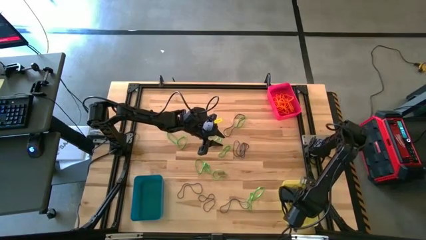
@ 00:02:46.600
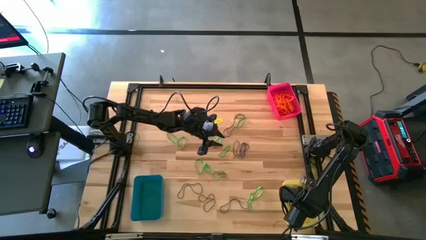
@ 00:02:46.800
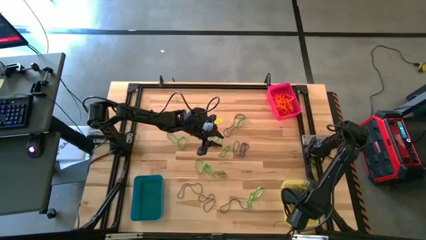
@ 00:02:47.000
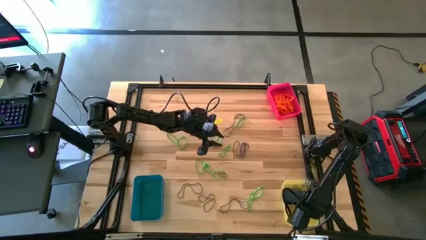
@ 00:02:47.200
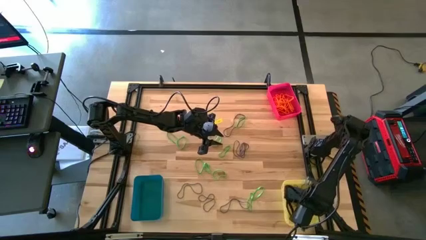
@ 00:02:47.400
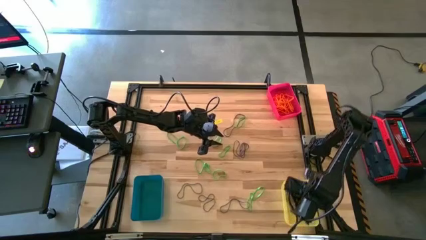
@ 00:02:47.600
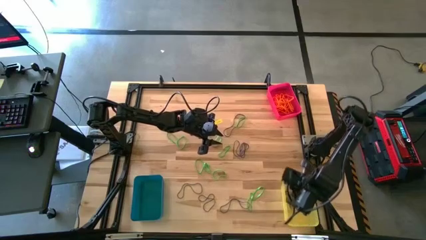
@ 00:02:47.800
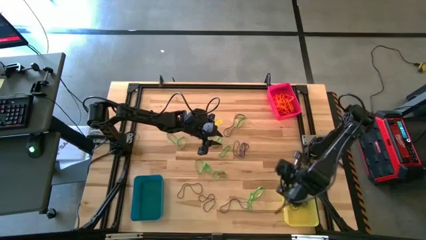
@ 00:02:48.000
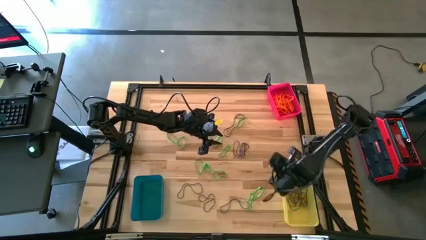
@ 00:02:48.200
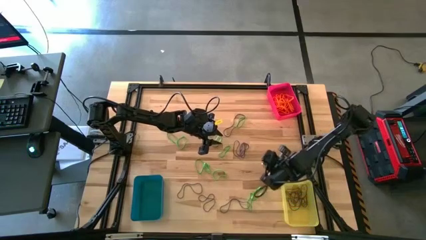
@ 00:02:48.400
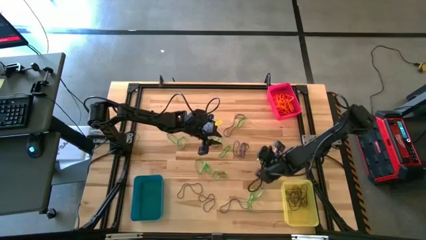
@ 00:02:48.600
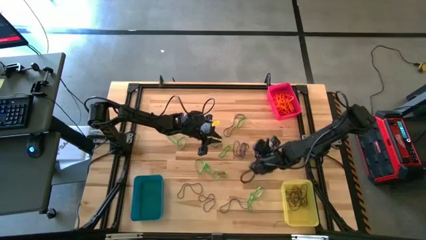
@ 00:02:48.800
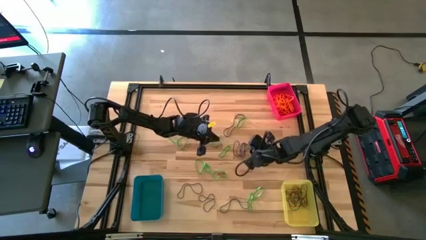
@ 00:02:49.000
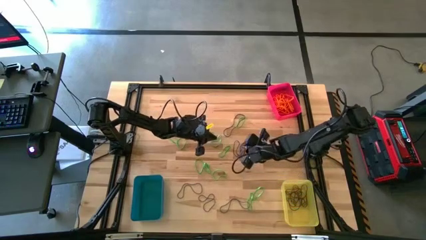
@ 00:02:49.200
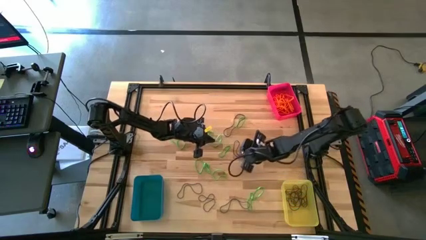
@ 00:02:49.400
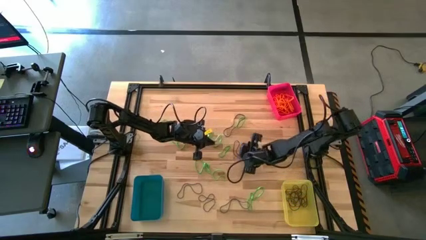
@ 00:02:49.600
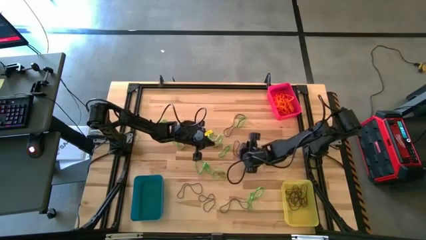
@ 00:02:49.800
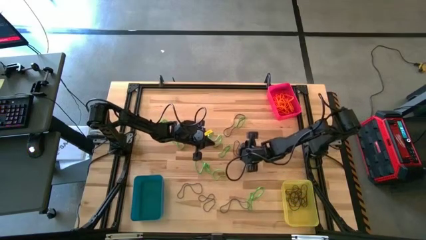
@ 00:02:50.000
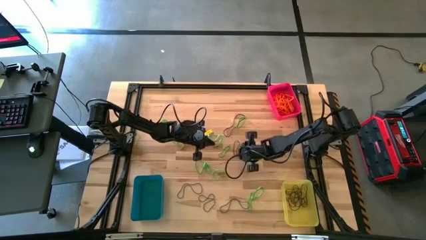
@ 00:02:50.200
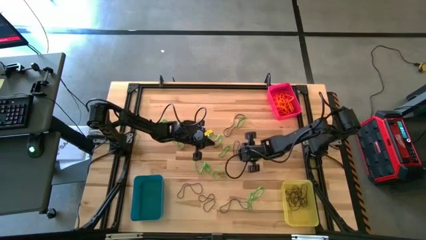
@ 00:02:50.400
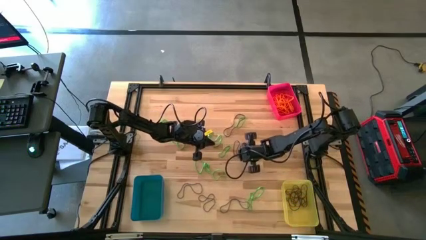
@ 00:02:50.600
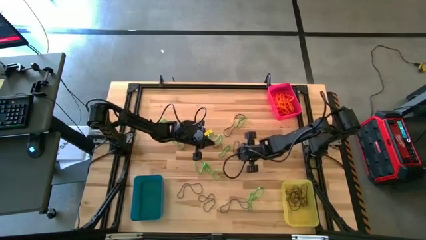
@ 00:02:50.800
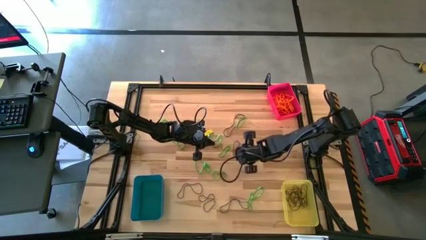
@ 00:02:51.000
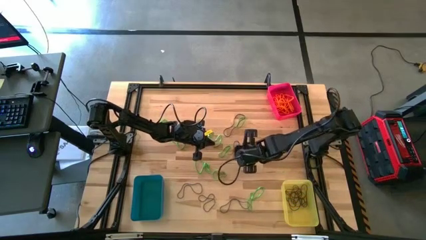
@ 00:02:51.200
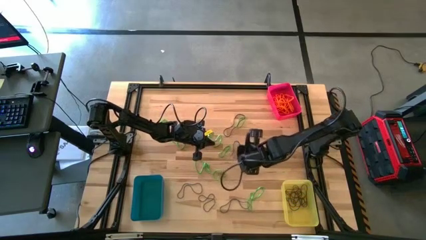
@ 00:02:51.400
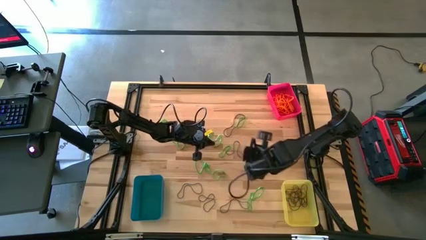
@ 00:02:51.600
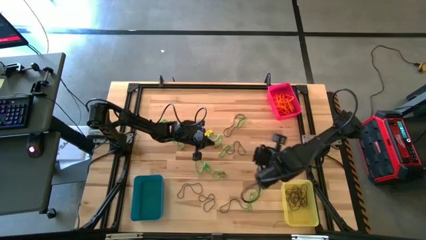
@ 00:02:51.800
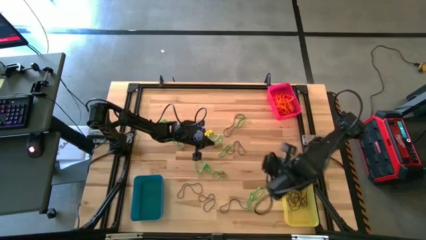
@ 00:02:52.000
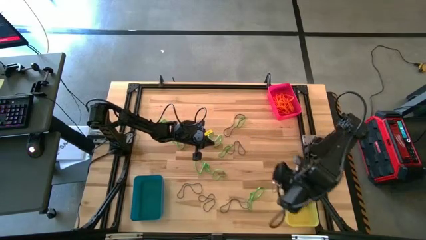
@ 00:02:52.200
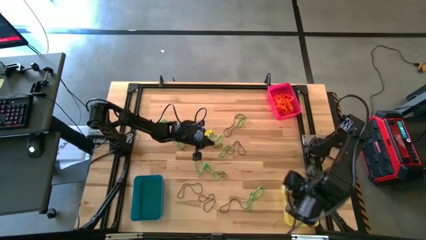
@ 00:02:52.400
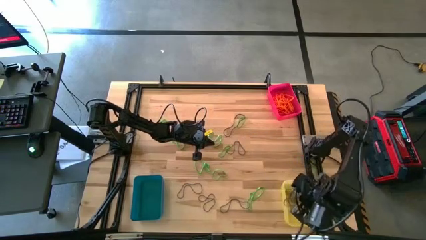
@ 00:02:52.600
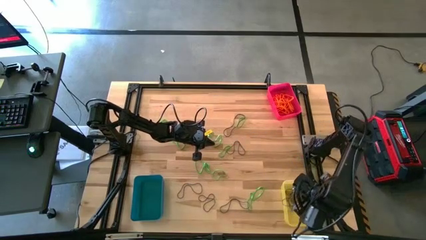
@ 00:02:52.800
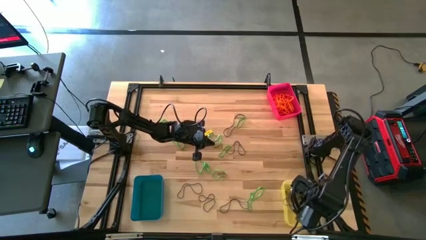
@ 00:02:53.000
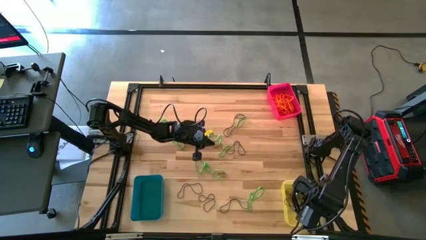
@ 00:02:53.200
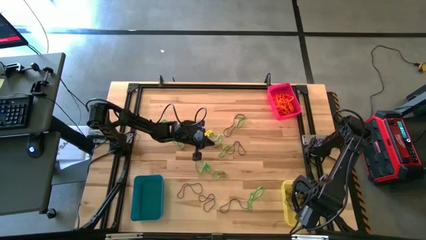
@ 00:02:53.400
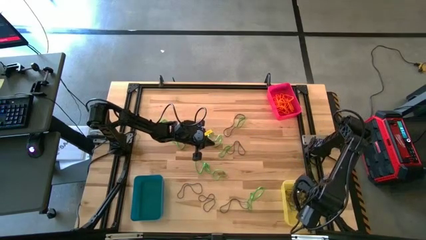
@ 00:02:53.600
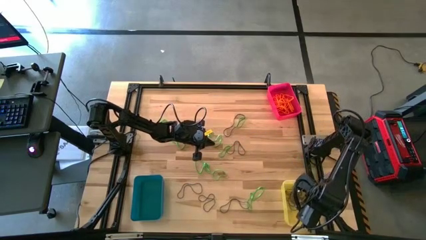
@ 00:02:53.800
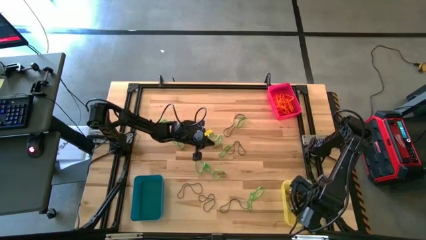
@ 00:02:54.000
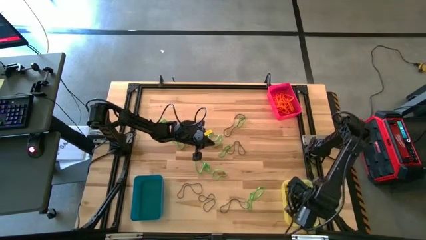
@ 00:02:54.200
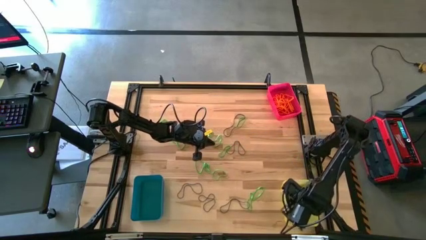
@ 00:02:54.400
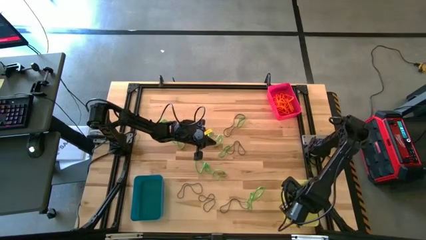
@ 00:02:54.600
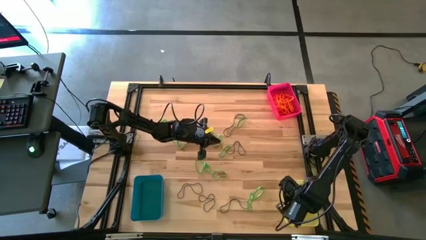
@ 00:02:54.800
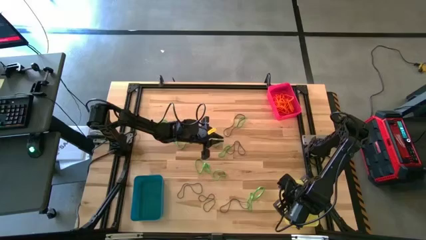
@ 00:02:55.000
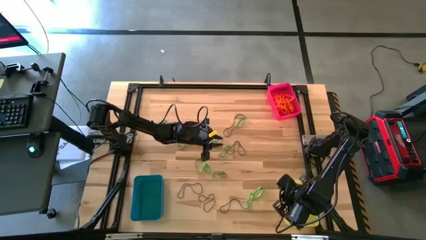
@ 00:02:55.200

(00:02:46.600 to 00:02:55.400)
Task: Sort rubber bands into baskets
Put the purple rubber band into the yellow bin

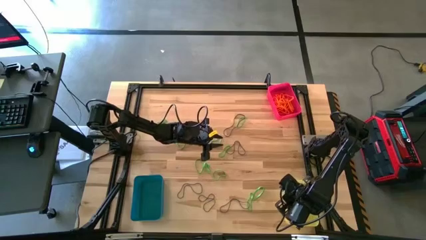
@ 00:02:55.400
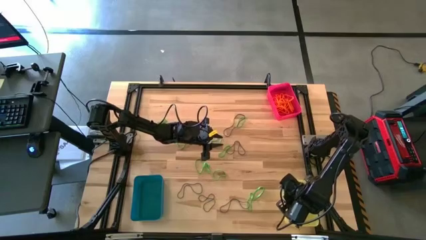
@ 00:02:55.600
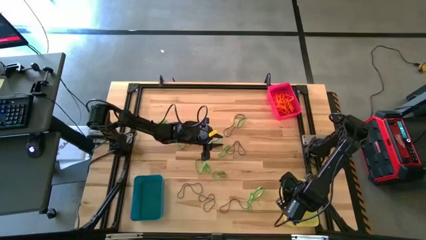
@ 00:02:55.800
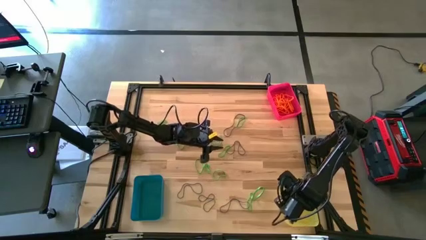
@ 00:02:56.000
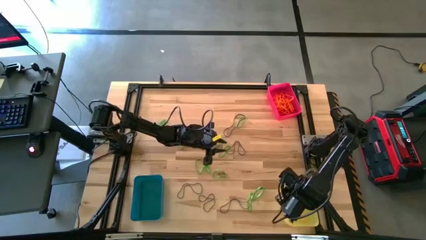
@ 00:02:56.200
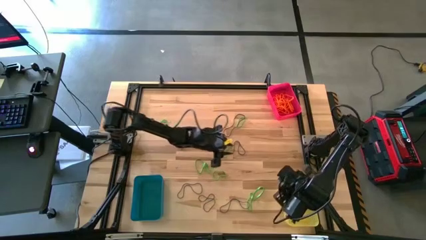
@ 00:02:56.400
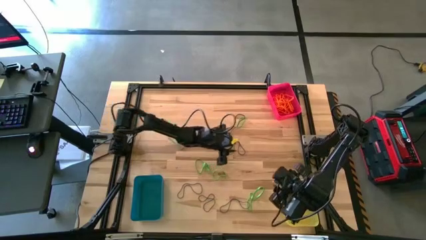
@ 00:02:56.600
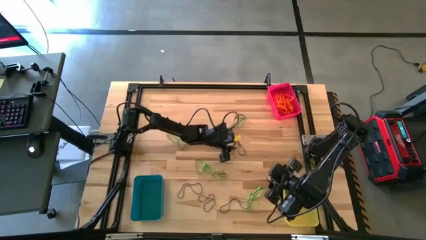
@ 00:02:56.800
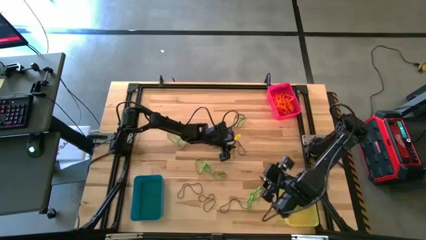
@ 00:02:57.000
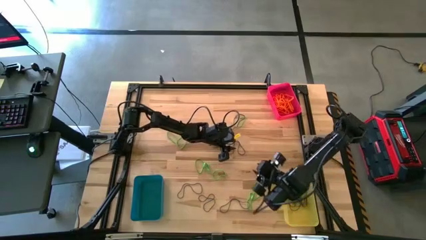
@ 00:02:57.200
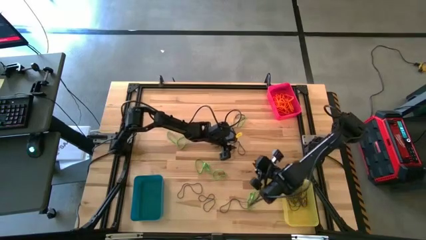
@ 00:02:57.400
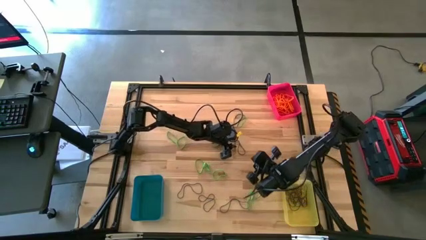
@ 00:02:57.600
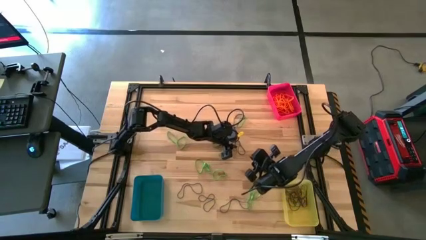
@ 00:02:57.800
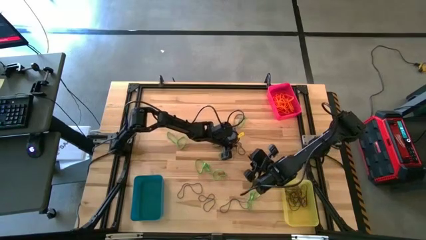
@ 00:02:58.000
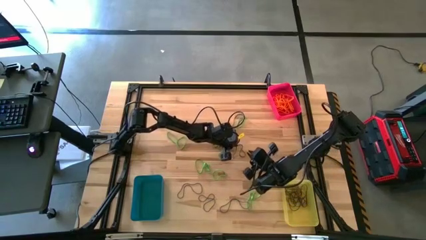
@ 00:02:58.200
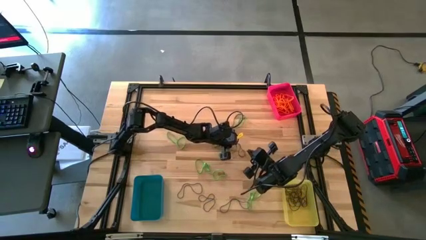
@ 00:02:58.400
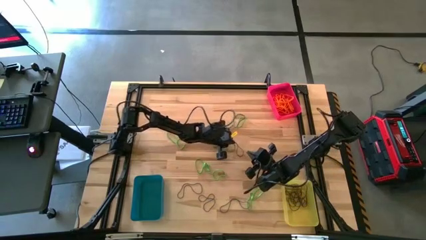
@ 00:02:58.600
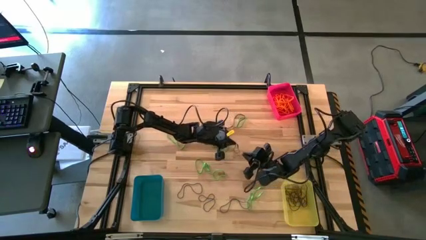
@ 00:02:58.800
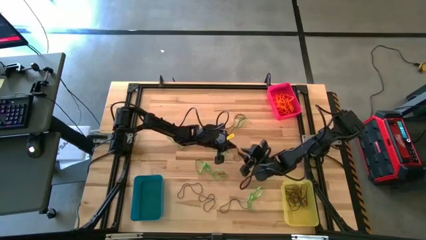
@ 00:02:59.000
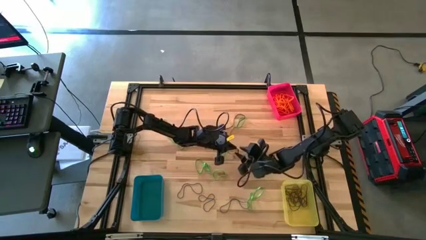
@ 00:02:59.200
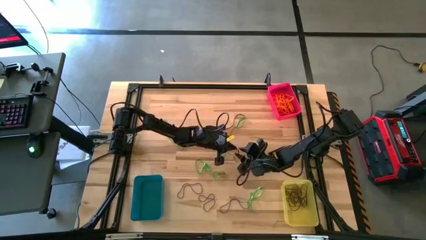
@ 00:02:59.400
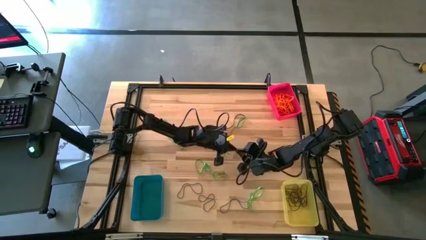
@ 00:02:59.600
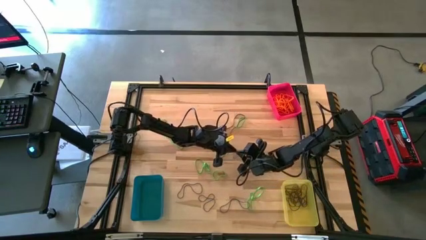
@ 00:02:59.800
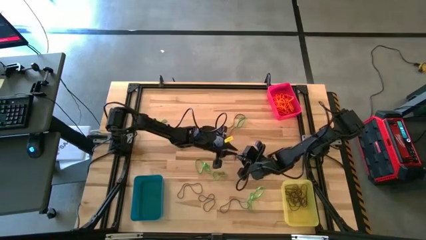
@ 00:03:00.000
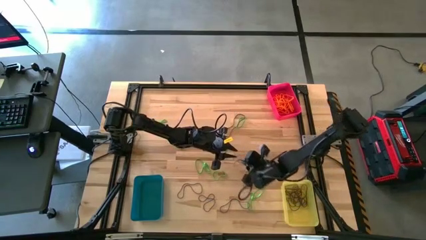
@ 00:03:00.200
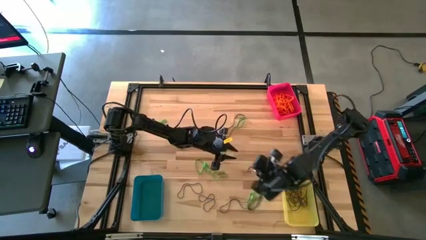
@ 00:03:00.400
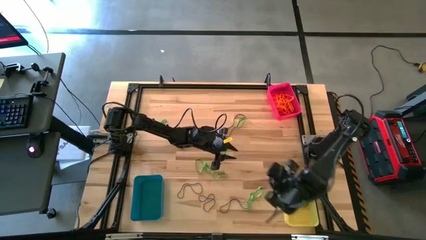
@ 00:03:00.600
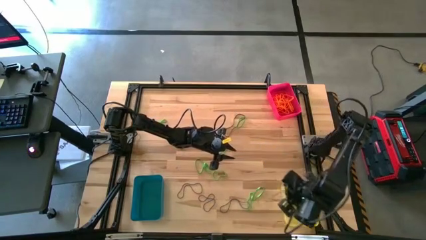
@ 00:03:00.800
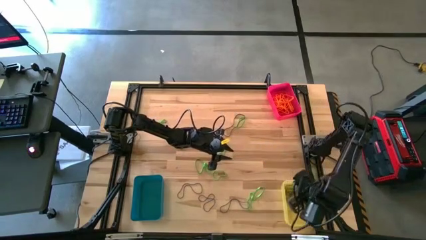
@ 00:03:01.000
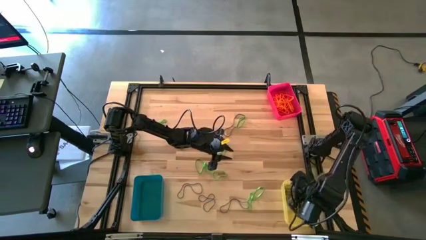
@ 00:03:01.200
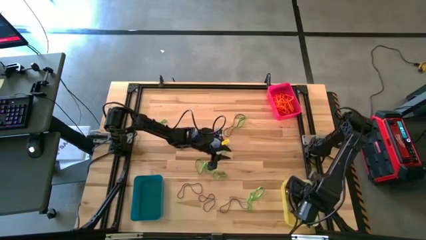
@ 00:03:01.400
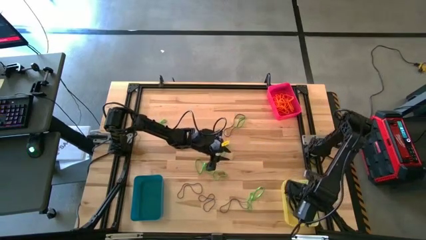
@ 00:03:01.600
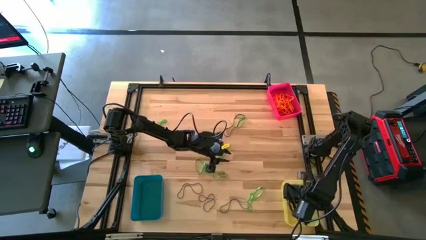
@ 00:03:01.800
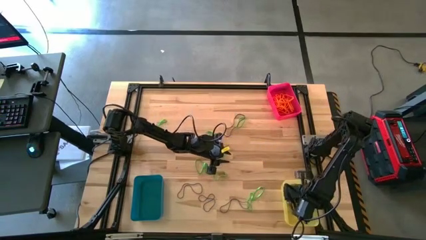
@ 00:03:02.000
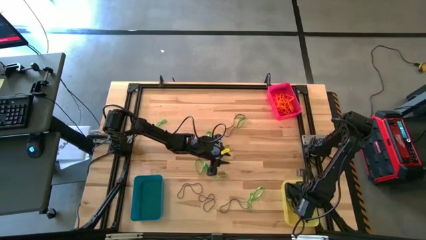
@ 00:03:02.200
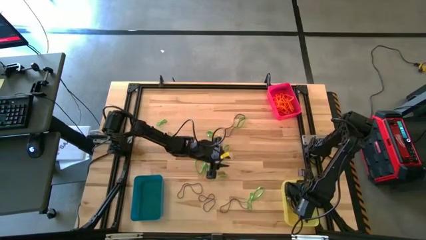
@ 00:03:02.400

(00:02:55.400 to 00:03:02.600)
Put the purple rubber band into the yellow bin
